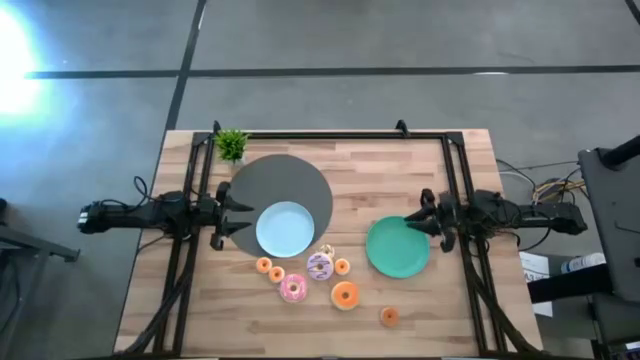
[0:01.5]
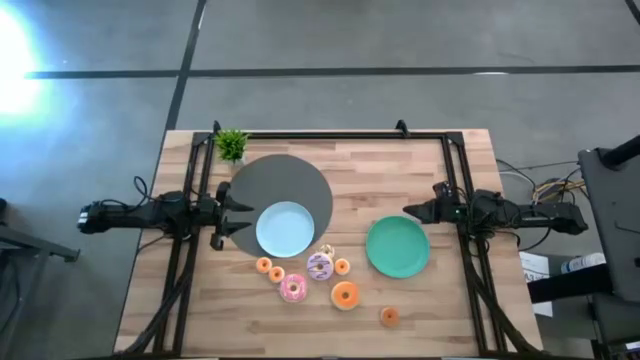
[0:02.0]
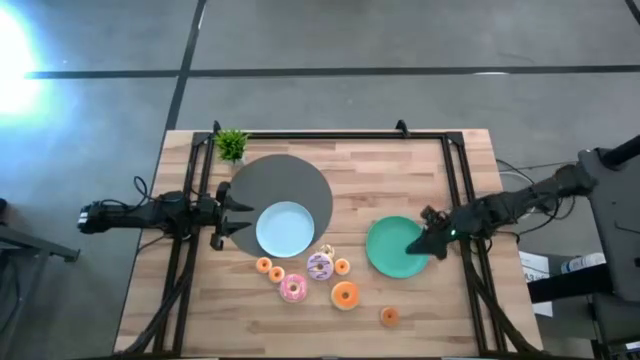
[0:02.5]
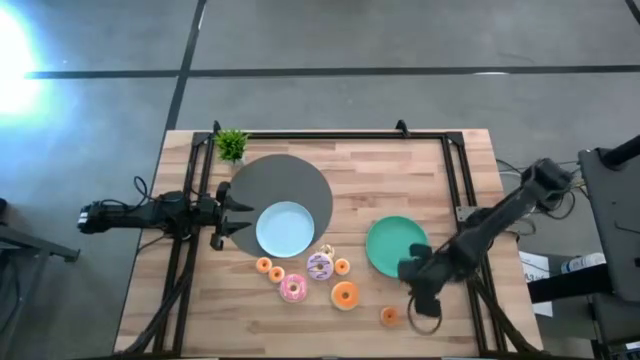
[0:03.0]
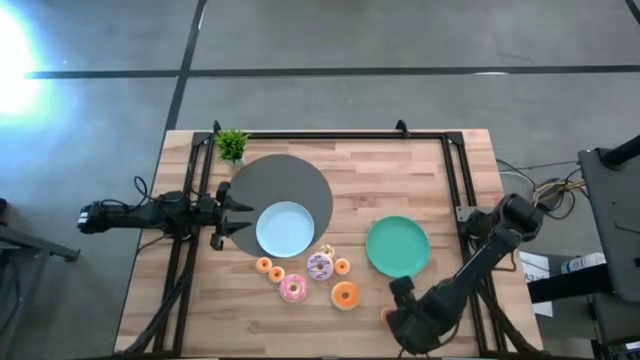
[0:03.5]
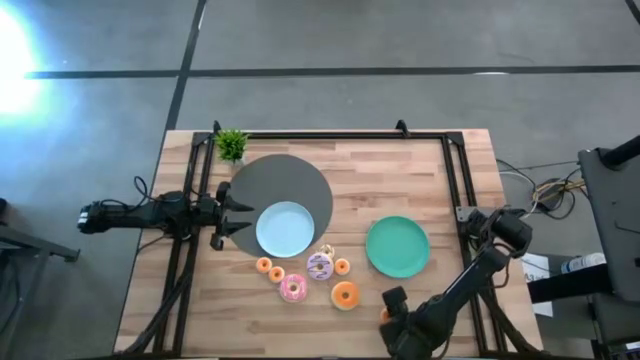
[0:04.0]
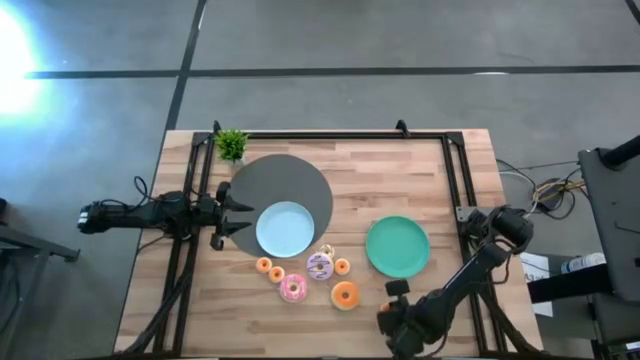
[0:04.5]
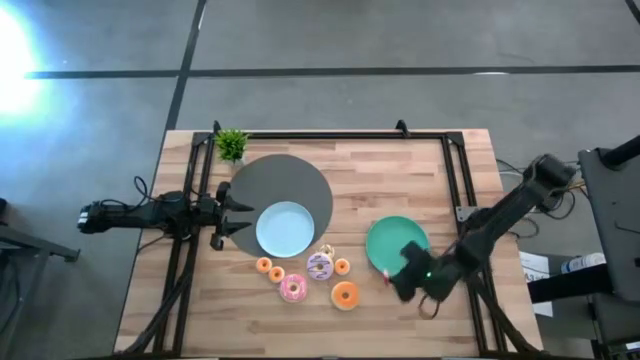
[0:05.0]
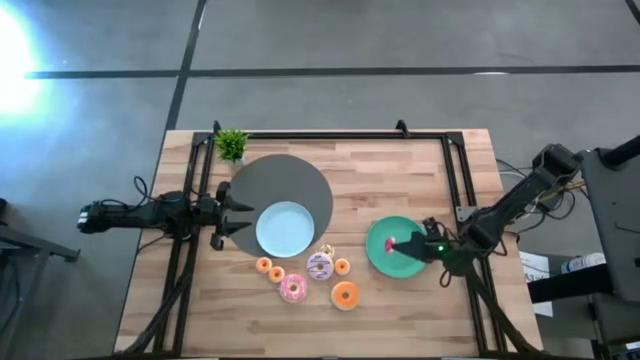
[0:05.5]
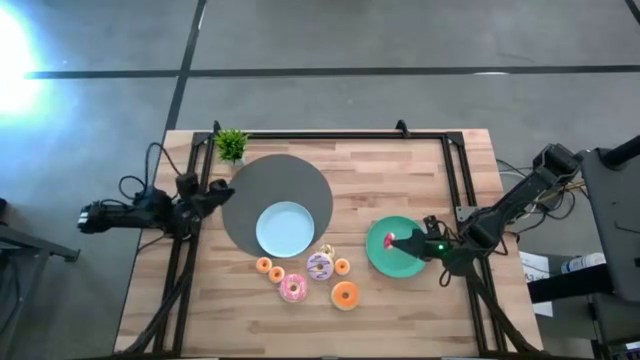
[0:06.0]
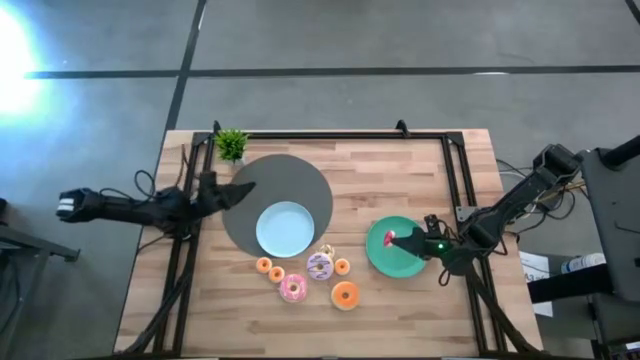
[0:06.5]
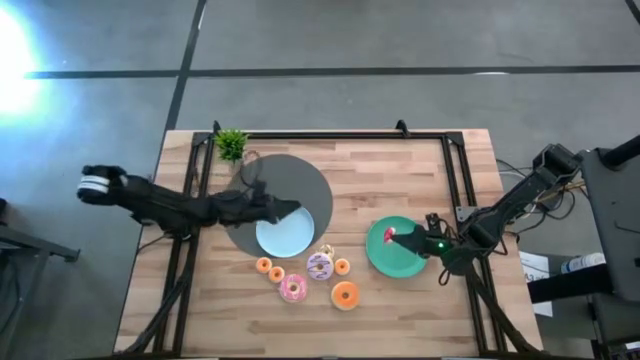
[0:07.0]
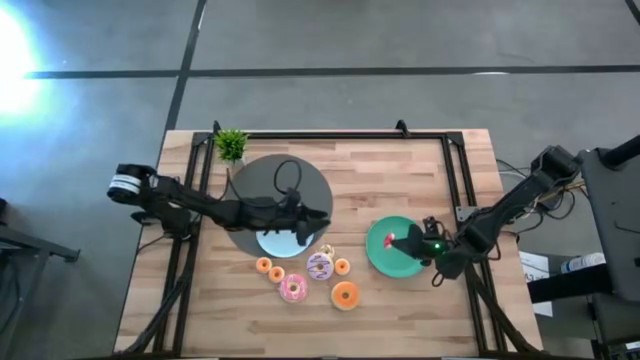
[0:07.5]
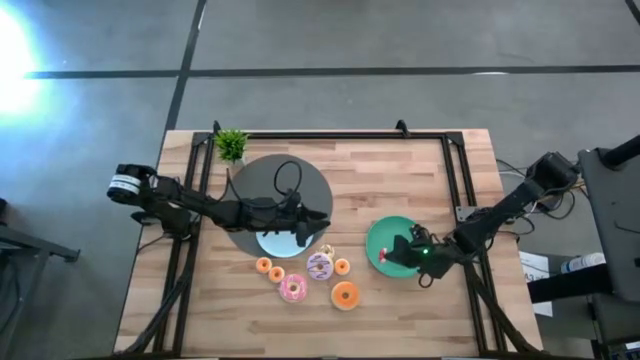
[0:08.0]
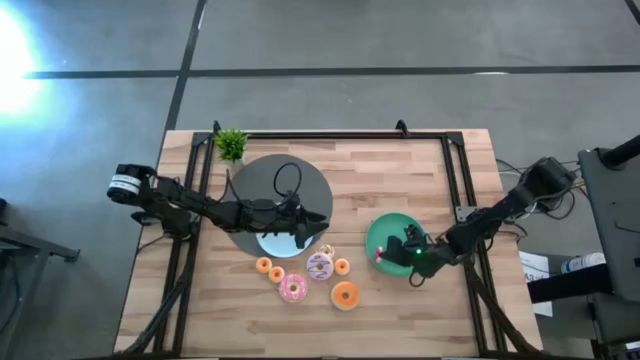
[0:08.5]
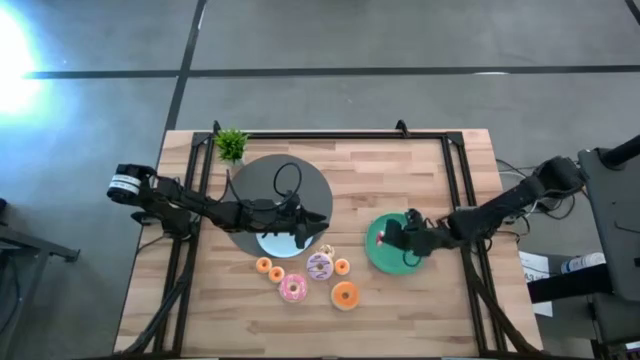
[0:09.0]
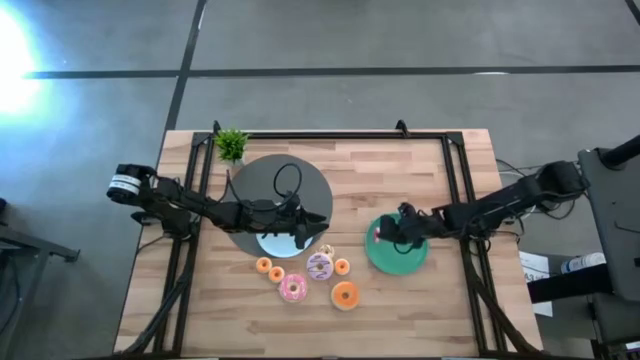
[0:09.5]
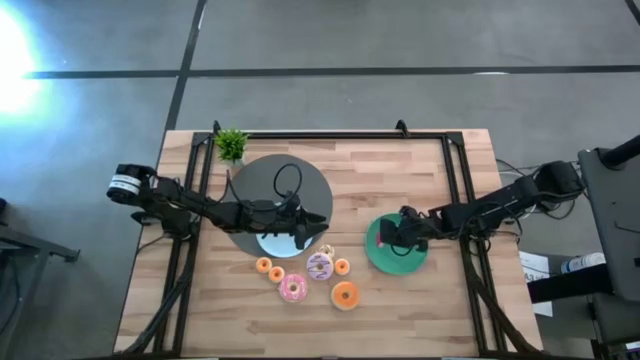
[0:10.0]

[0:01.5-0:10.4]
Task: Pick & Place donuts
Put the small orange donut on the green plate

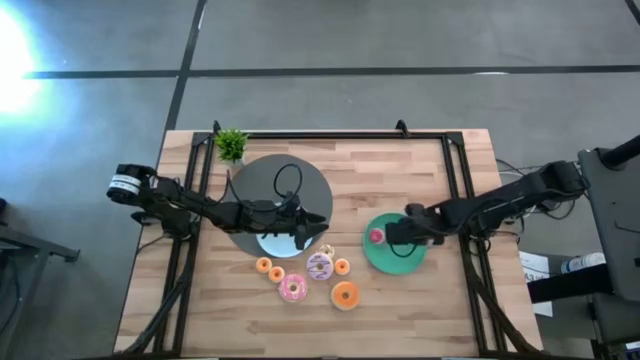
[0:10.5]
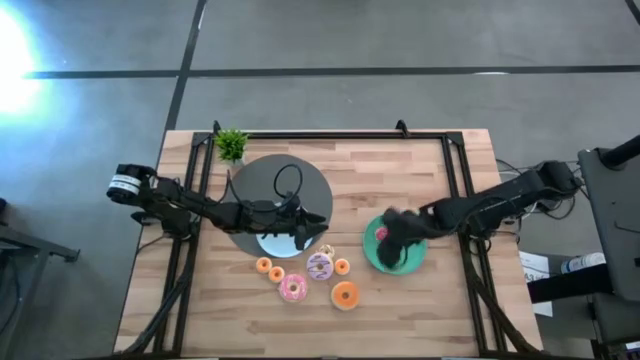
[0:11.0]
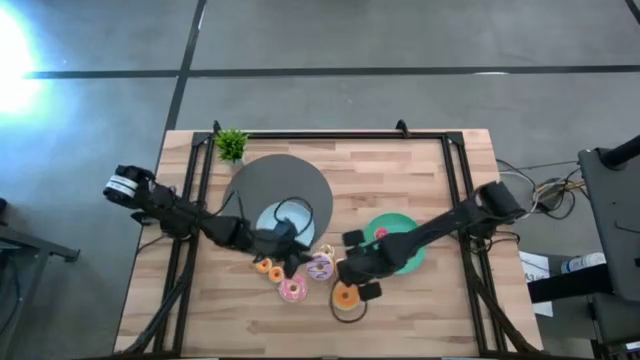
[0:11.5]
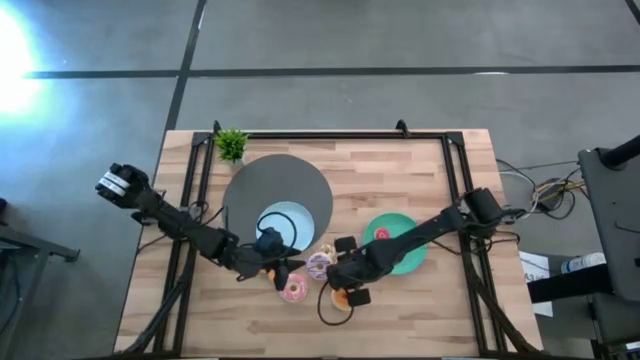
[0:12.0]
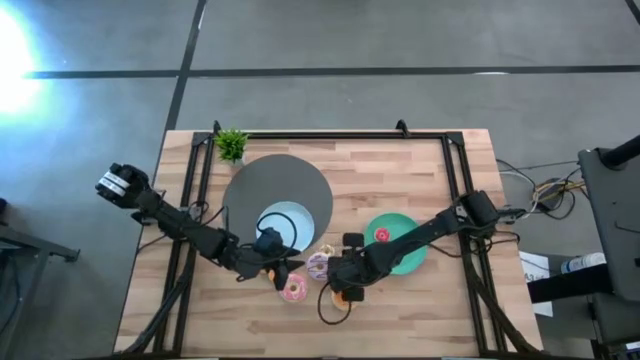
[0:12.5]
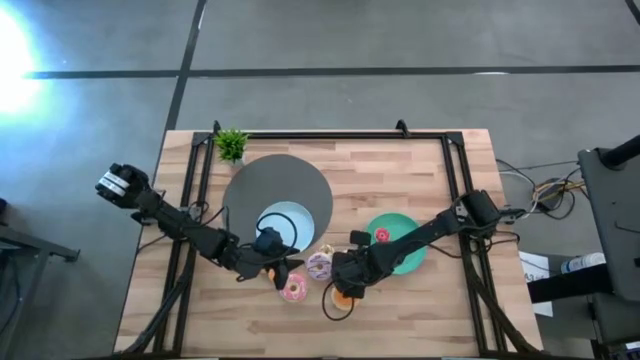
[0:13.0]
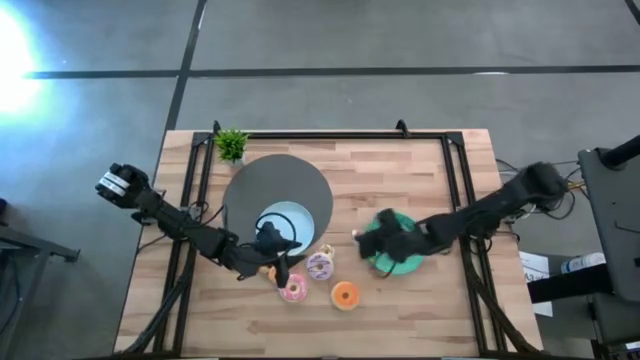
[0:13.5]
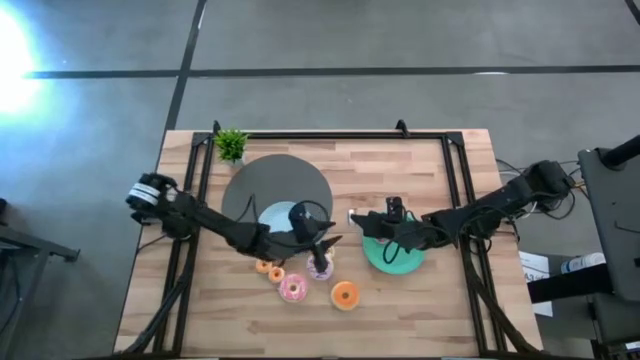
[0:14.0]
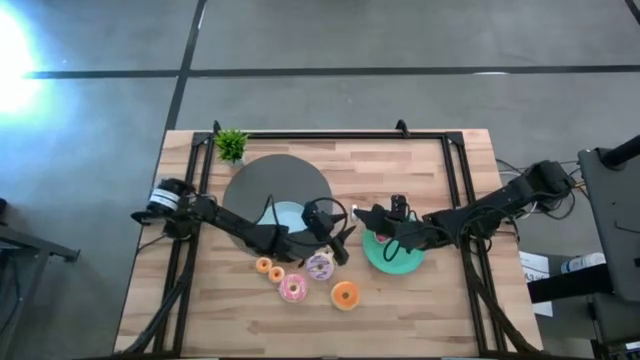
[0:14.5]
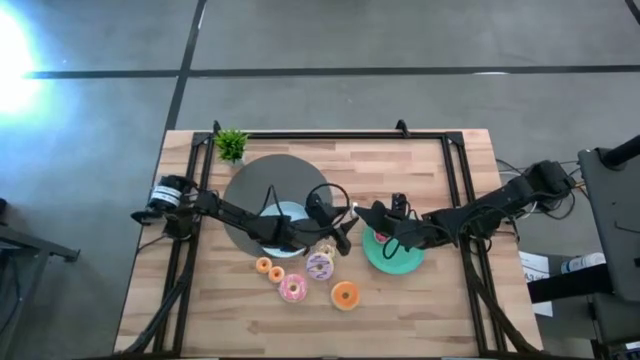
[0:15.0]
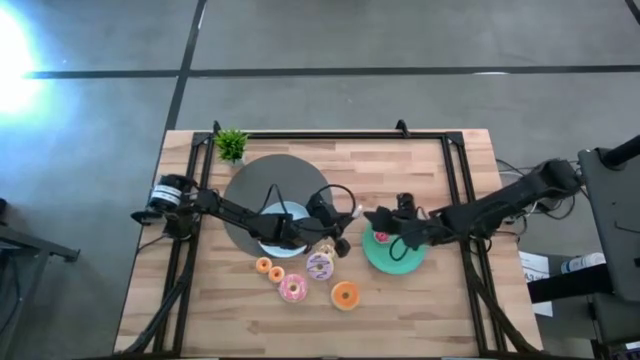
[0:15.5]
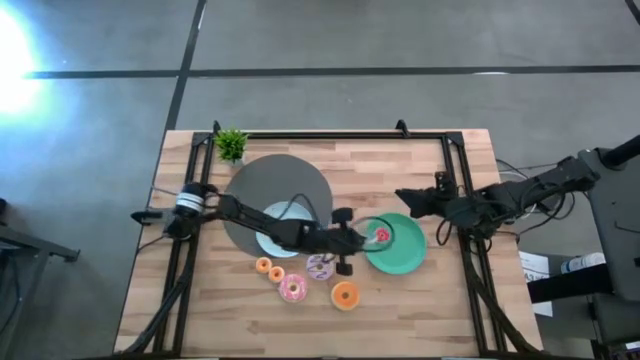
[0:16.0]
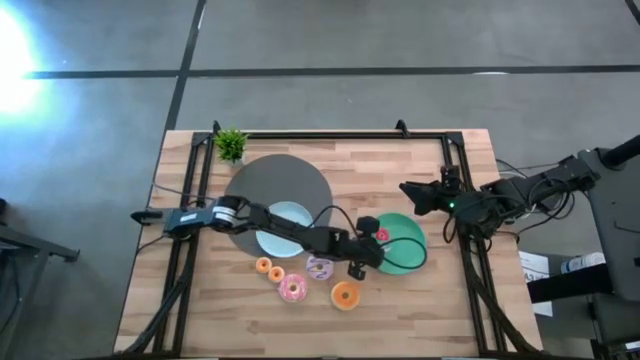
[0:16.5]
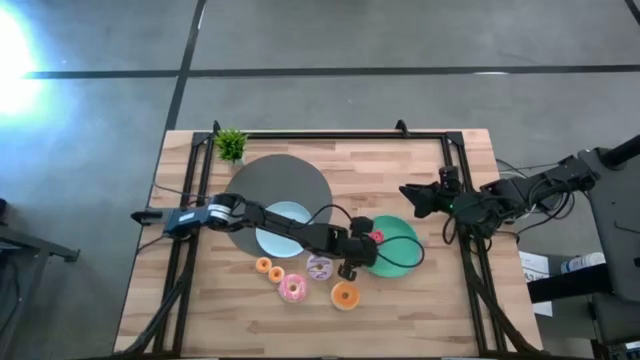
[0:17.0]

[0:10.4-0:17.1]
Put the small blue donut on the green plate

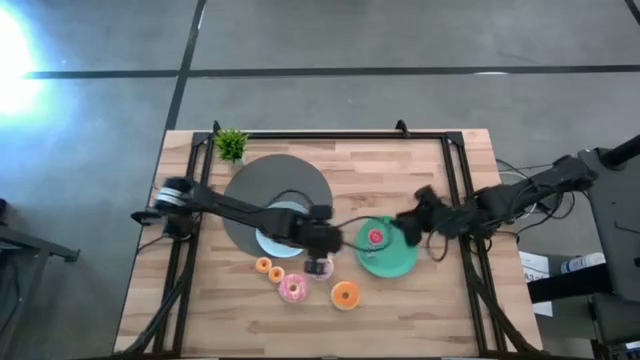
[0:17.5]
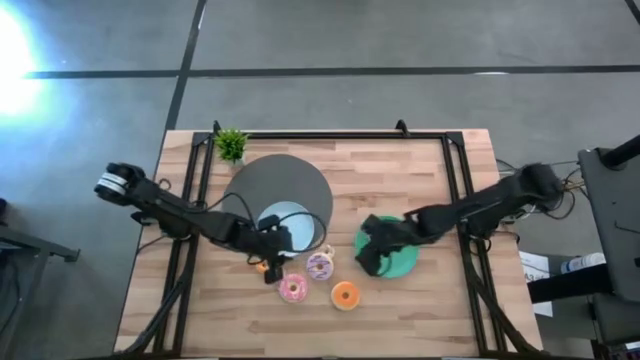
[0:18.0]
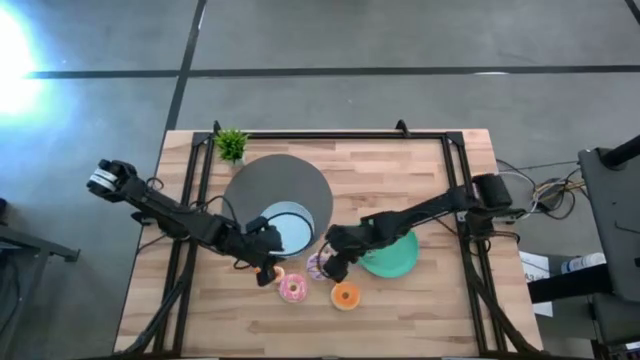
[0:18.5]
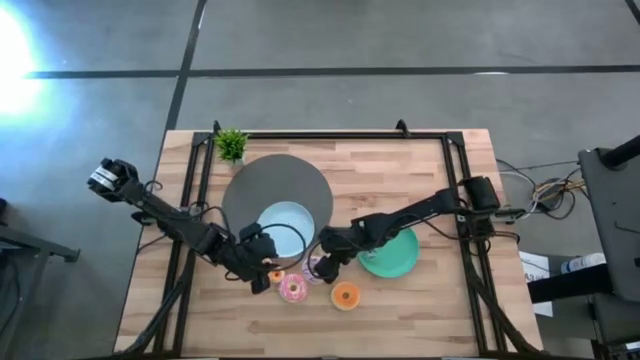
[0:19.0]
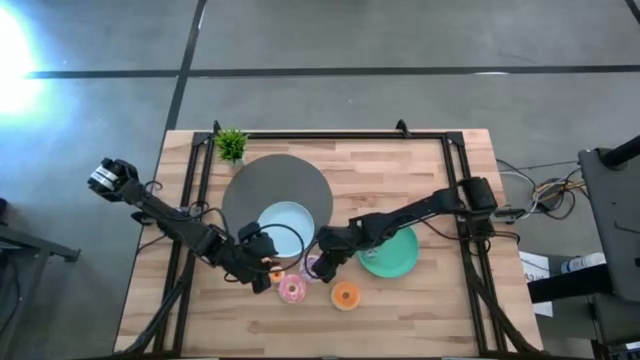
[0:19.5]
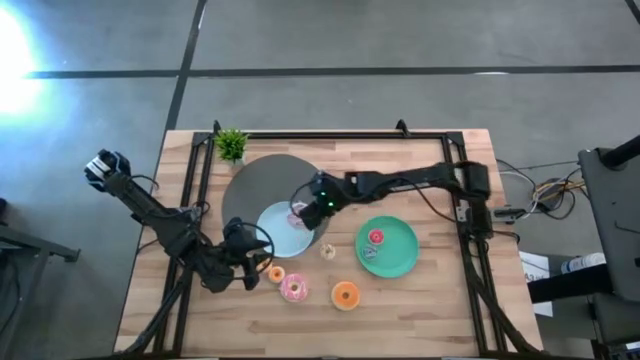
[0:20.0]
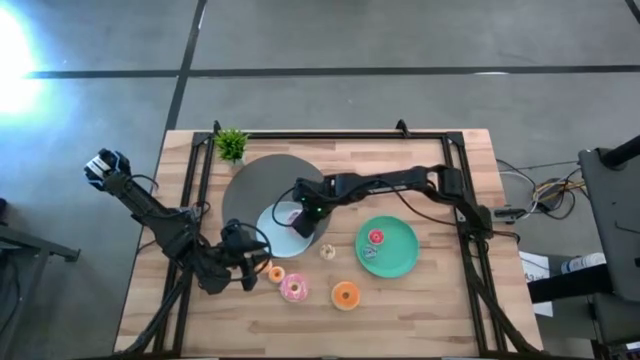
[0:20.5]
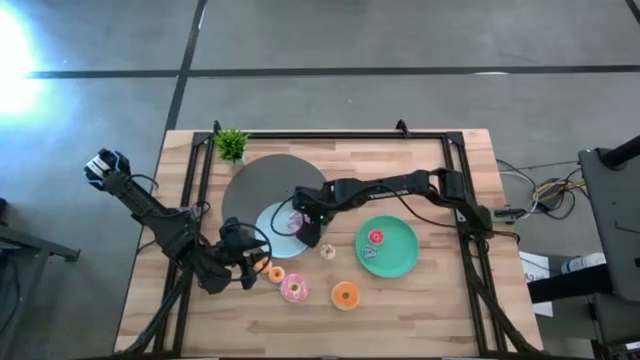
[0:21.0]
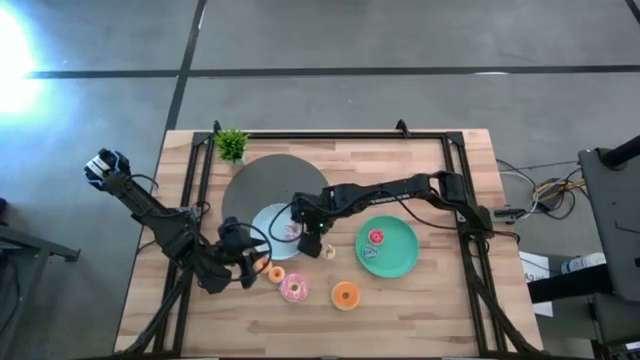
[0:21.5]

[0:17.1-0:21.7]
Put the big purple donut on the white plate

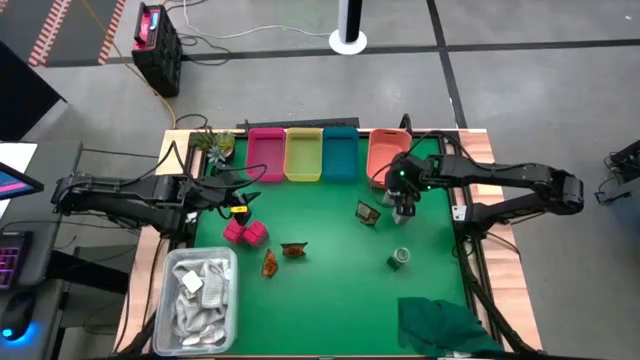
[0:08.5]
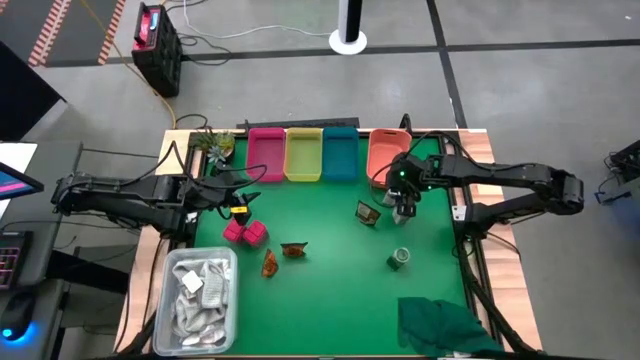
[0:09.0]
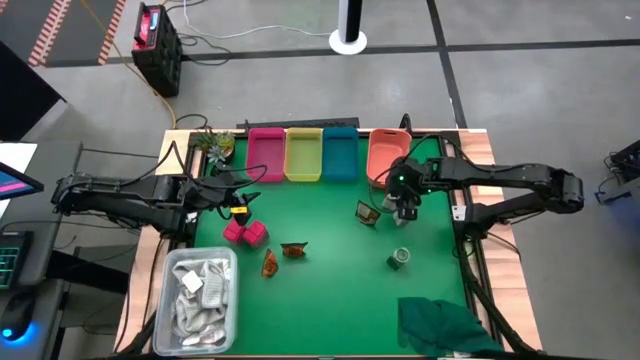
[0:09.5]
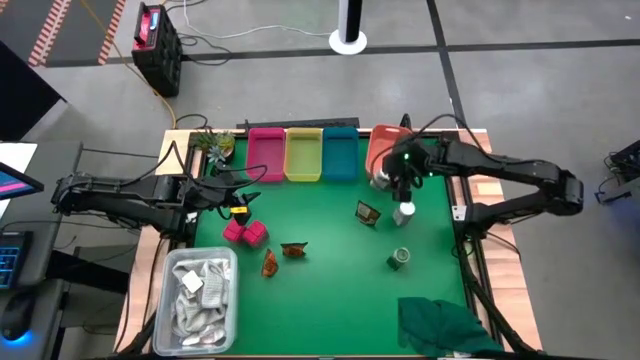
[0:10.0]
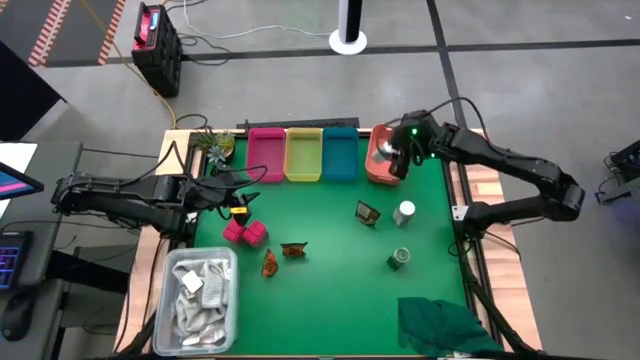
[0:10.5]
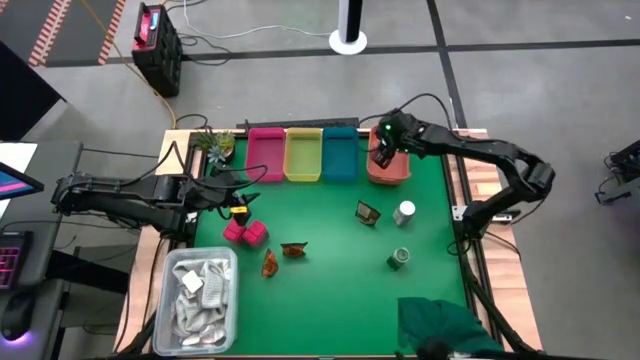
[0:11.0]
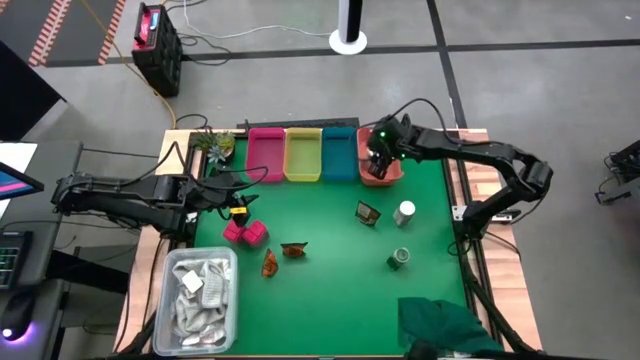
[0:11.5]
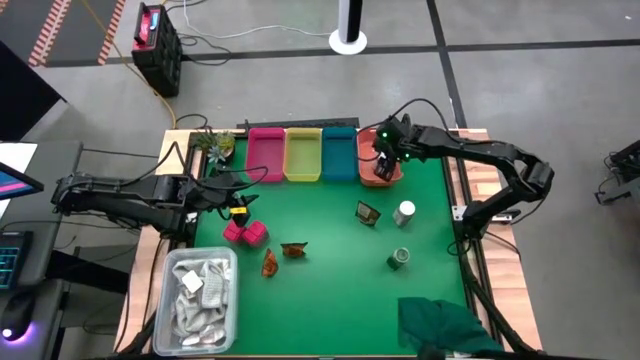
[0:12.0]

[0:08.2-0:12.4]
Task: Sort spices by type
Put the white lid seasoning bottle into the orange bin
